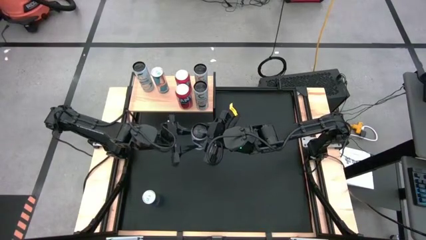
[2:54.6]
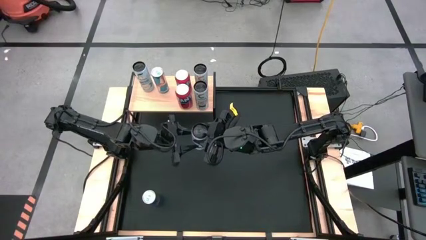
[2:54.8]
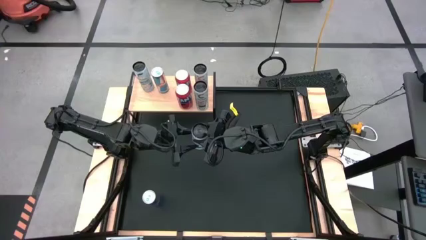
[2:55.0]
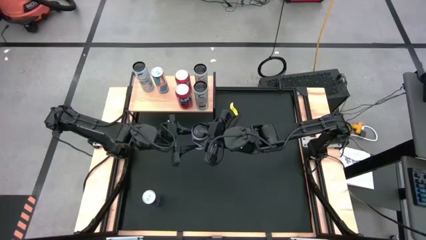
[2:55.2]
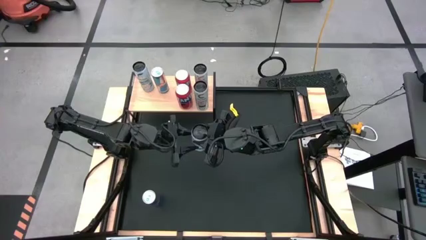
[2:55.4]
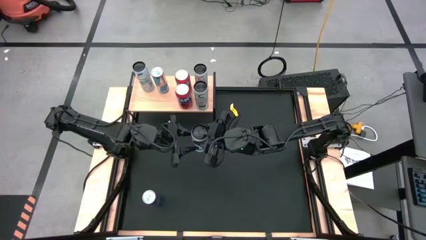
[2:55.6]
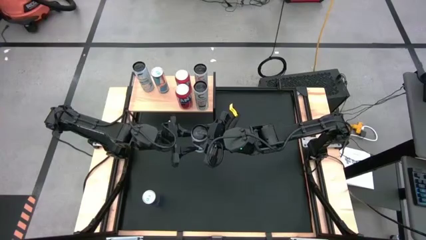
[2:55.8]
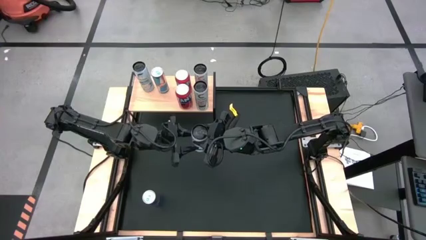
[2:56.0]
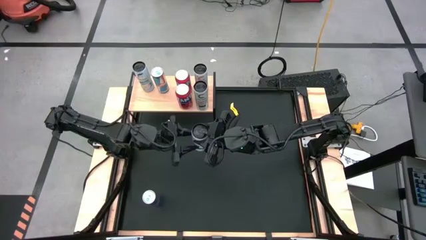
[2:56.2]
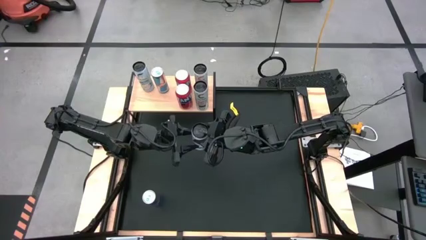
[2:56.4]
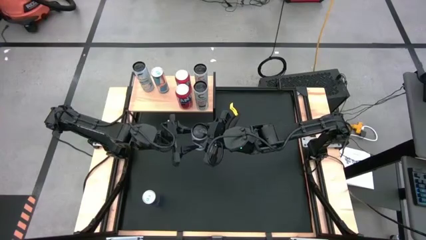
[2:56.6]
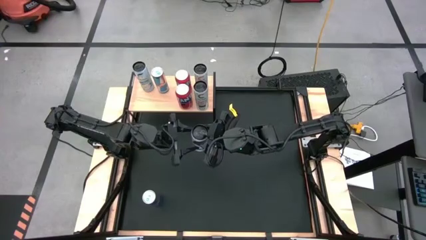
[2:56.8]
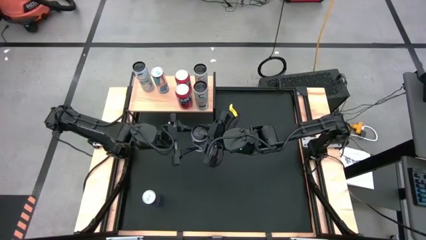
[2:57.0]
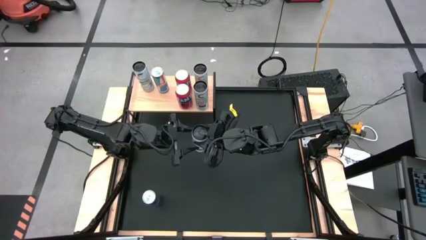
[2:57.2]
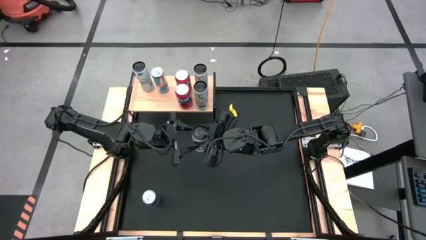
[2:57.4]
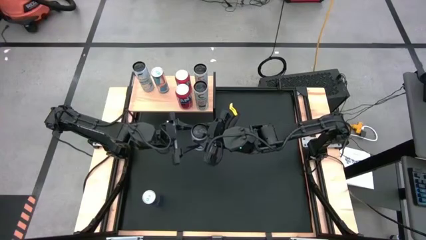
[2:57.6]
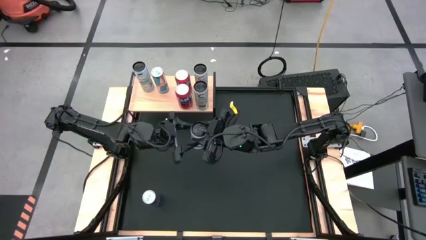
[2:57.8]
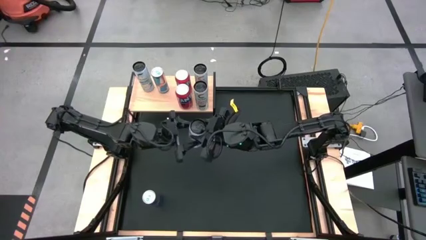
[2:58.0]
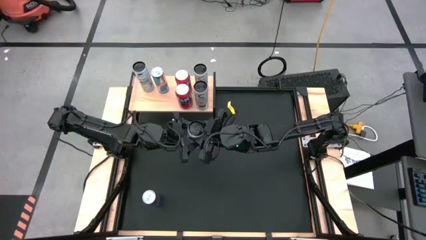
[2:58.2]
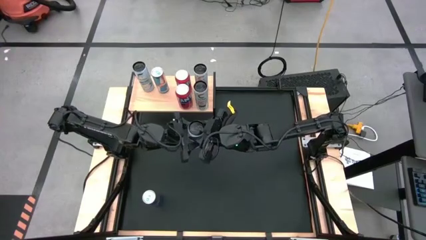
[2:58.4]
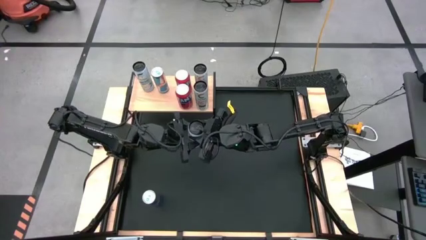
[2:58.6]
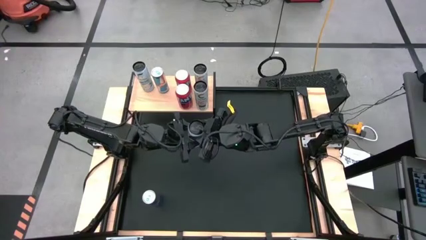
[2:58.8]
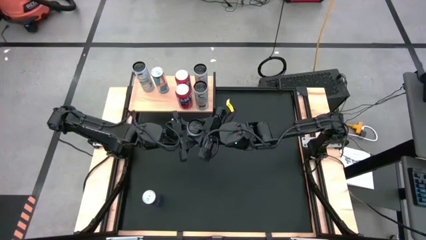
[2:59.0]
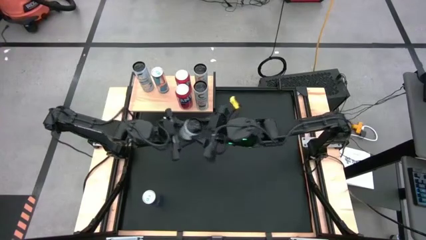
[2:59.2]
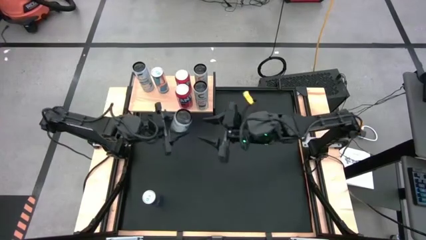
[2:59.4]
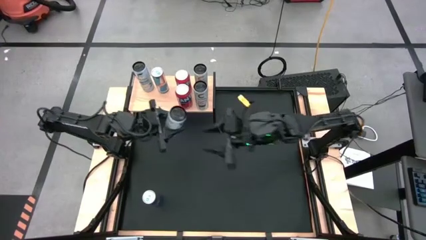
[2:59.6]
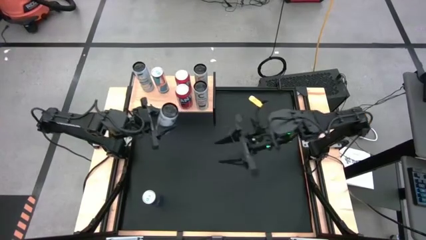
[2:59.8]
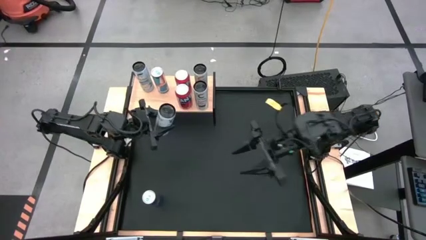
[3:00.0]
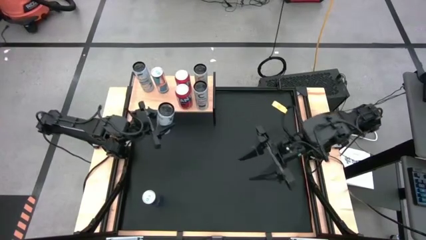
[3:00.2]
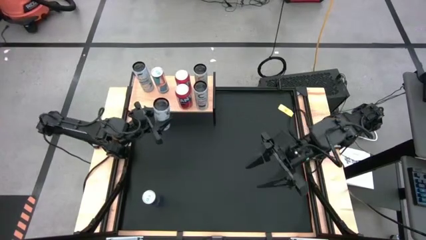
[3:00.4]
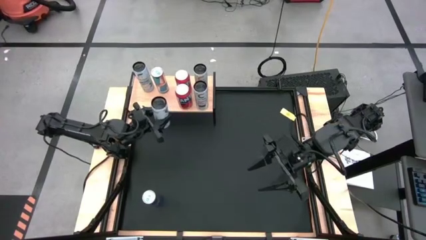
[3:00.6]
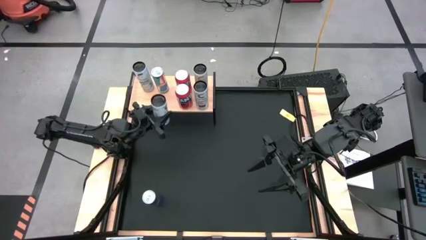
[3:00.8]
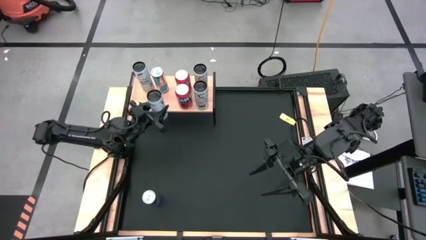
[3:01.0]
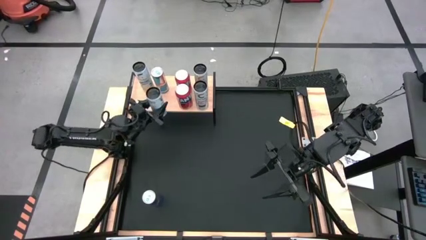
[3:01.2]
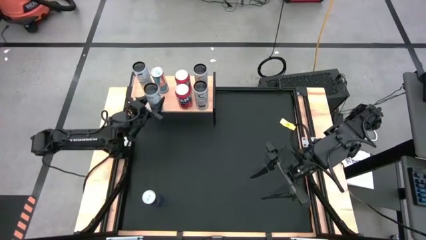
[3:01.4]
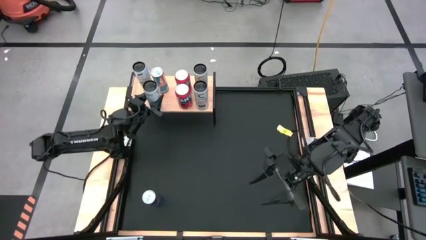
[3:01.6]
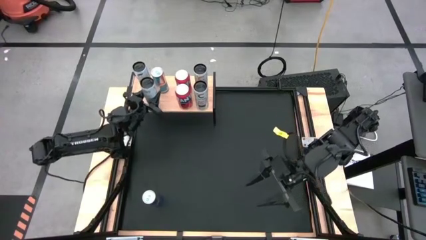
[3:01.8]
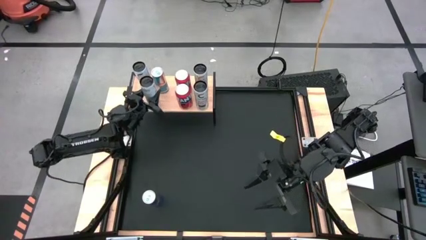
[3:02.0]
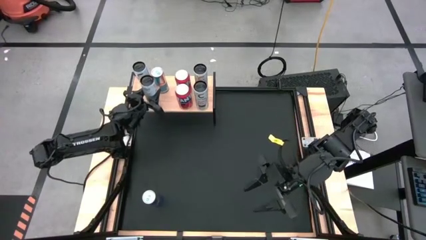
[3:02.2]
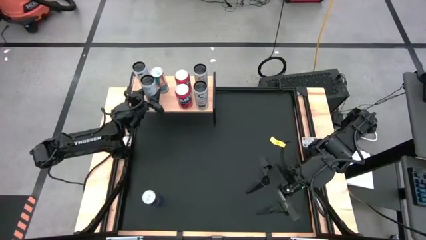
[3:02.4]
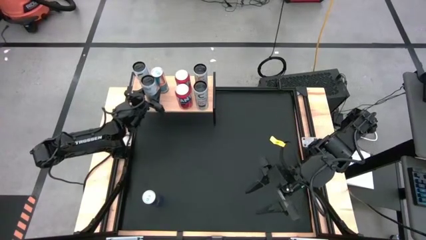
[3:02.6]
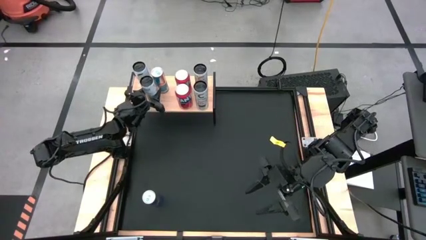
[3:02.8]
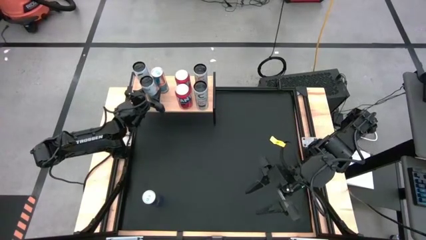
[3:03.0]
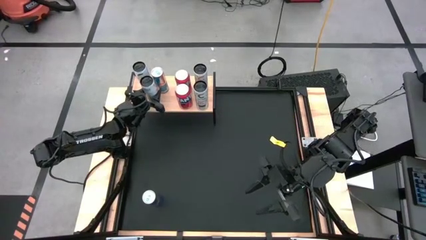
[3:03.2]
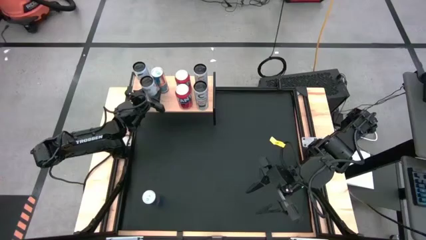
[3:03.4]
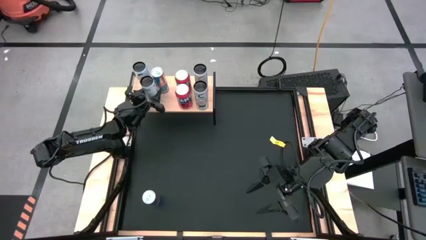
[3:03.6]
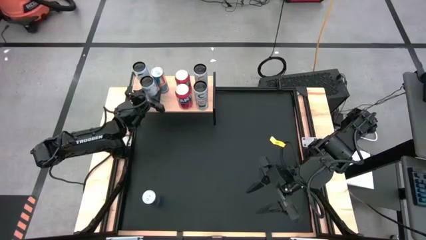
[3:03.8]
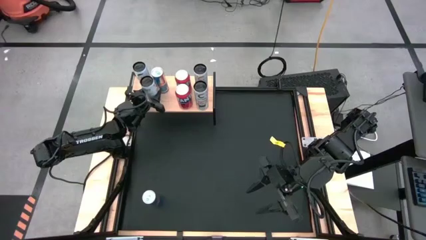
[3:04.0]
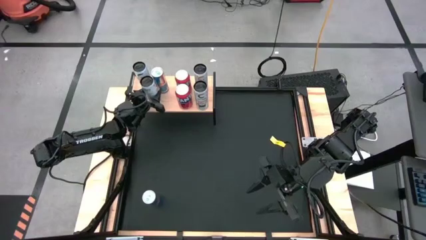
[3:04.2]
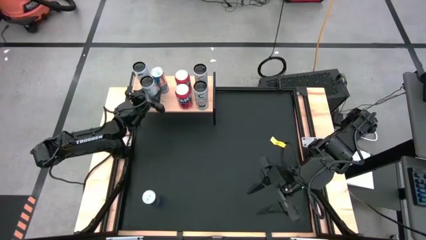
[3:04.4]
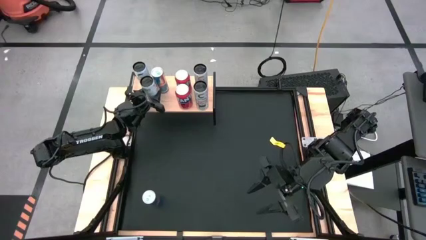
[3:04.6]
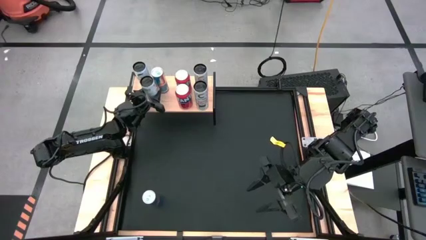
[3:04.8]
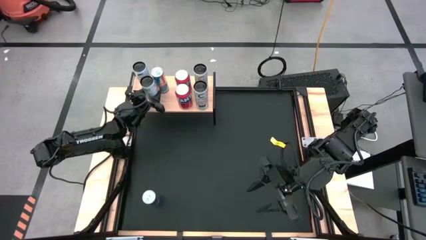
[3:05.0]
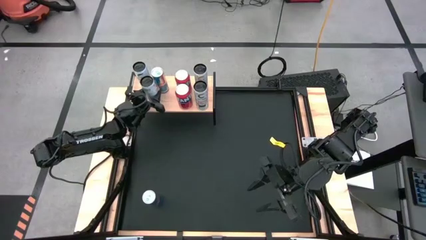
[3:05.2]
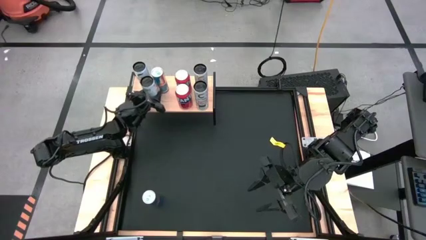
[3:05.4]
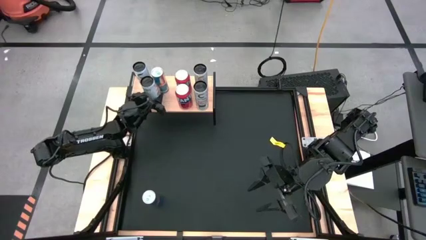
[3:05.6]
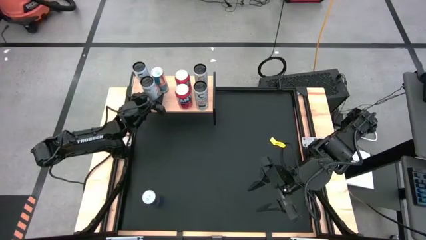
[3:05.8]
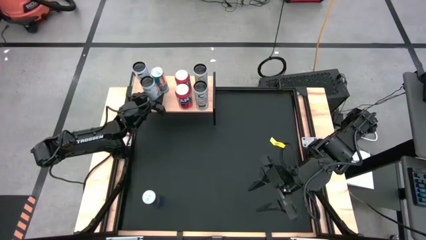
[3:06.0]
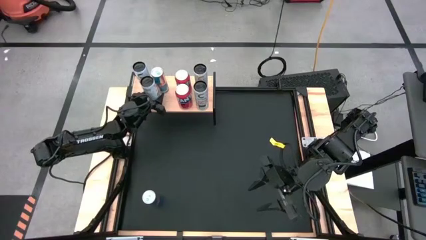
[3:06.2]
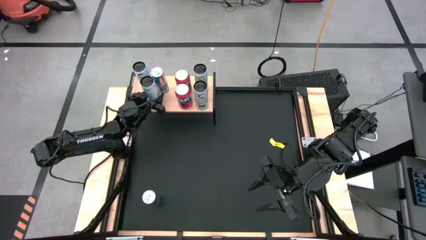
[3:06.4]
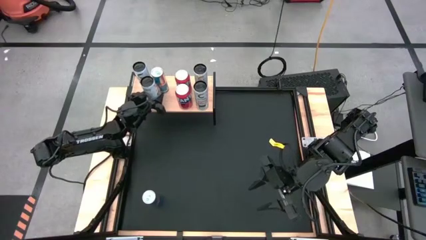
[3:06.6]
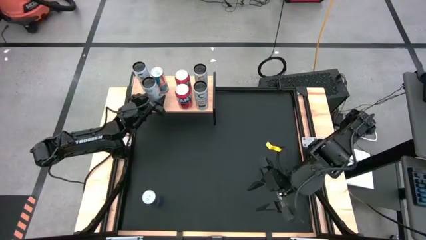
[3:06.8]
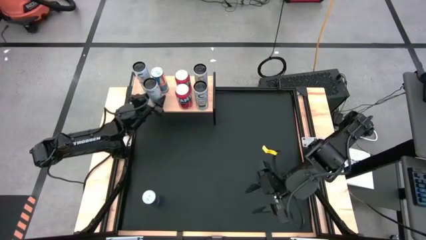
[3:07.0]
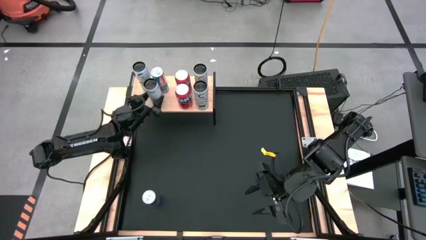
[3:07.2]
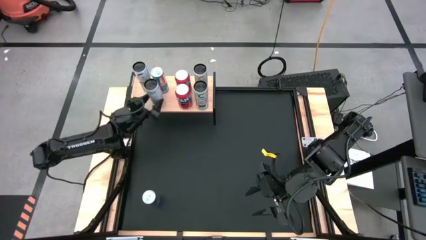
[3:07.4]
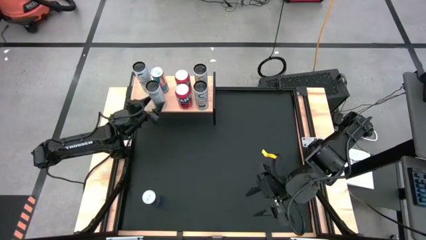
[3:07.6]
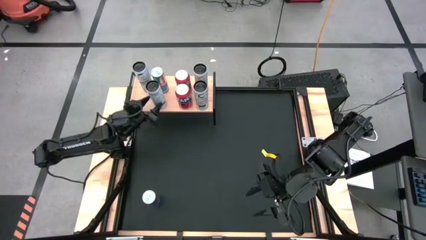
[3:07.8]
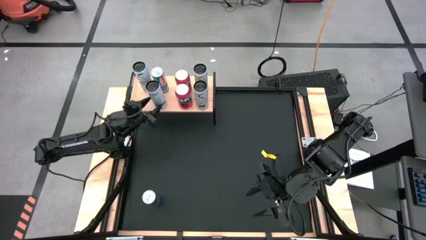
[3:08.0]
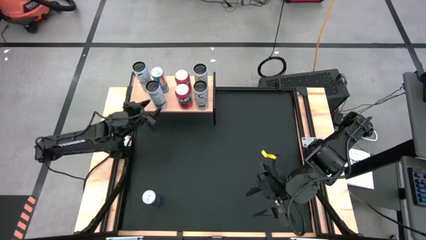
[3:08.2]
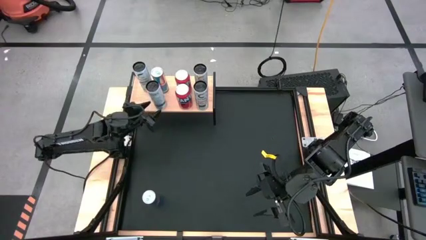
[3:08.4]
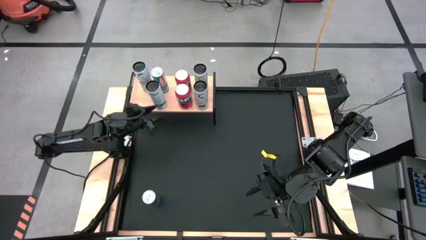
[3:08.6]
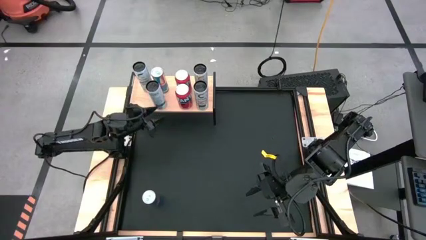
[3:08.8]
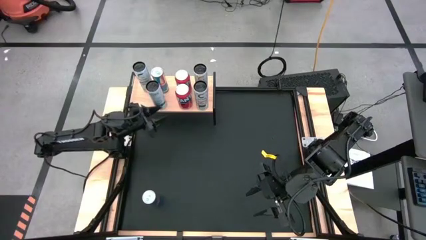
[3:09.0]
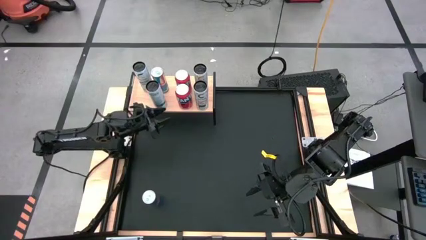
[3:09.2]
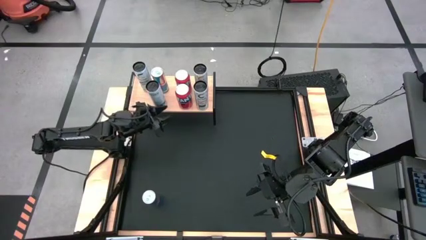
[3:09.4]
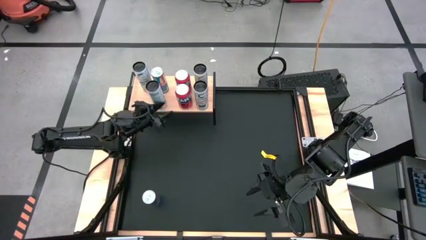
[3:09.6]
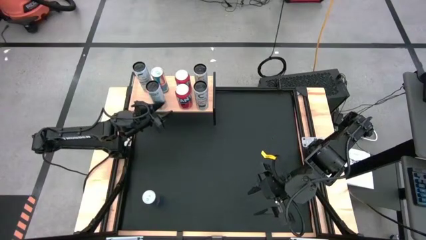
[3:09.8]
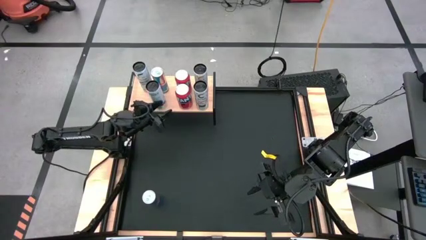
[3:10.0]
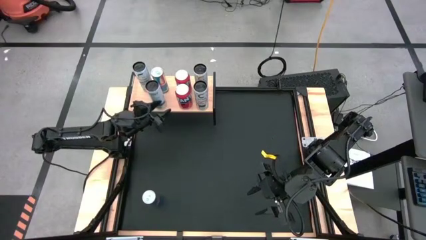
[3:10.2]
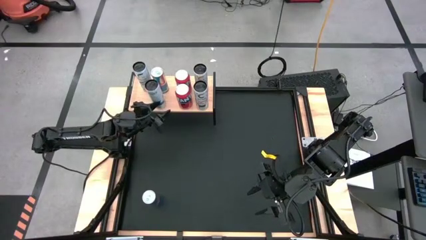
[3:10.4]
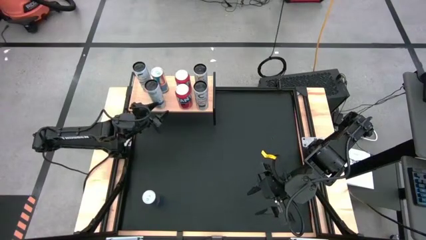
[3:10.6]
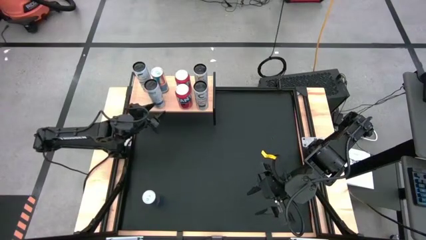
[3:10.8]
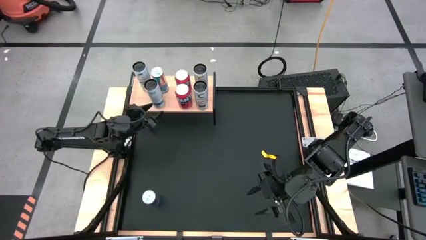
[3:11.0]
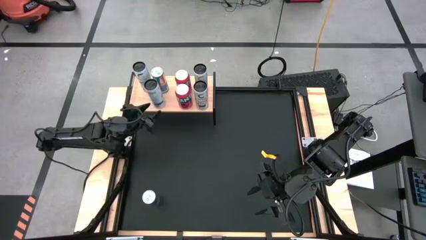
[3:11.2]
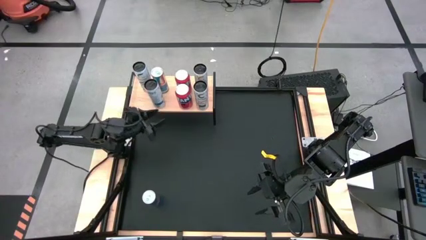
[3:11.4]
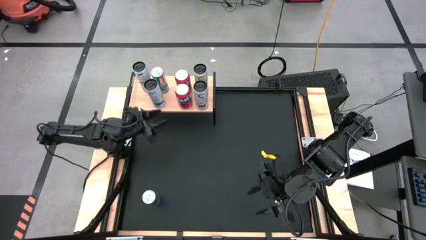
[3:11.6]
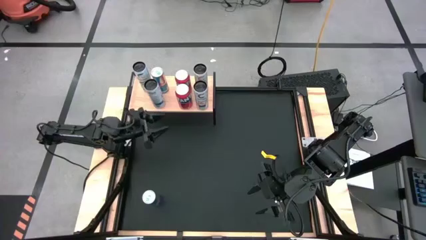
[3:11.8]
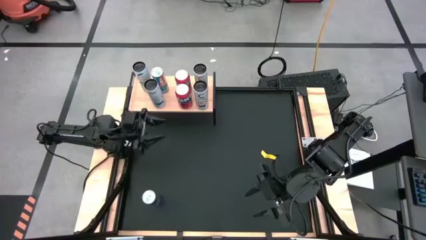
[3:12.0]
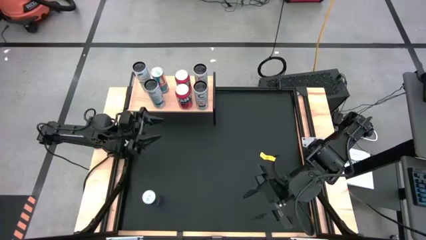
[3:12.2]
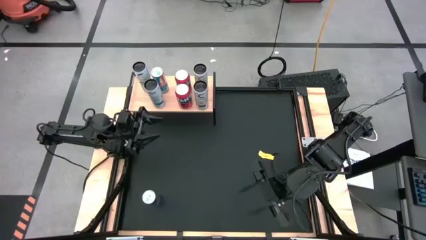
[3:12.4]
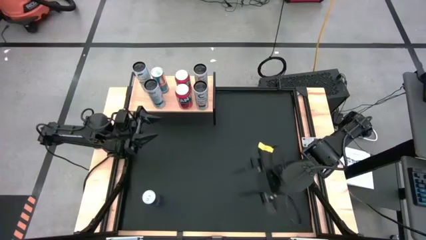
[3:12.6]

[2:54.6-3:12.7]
Task: Place canned beverage on shelf
Put the white-blue soda can aligned with the other white-blue soda can on the shelf
